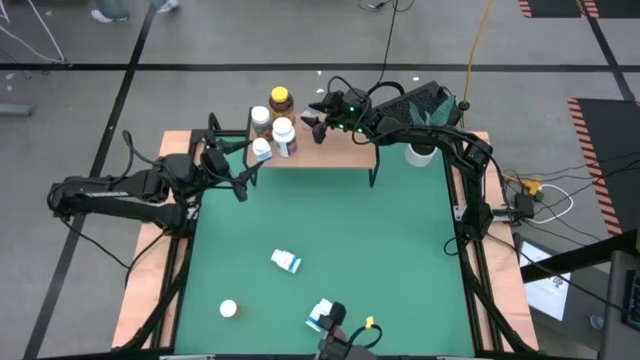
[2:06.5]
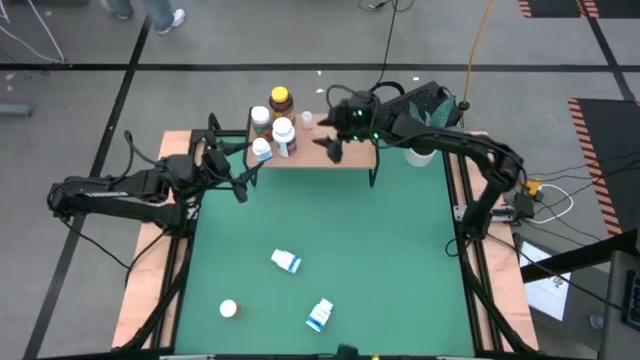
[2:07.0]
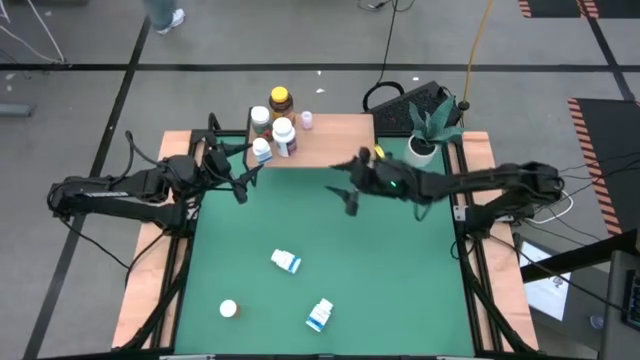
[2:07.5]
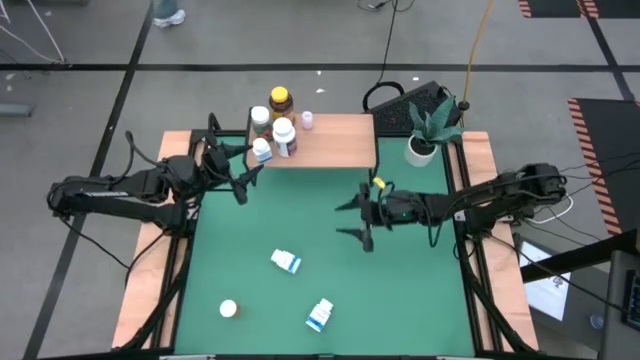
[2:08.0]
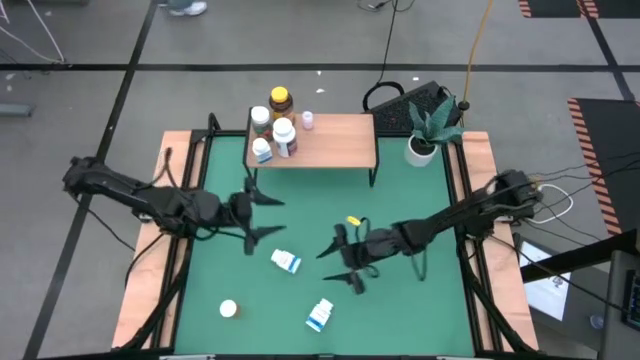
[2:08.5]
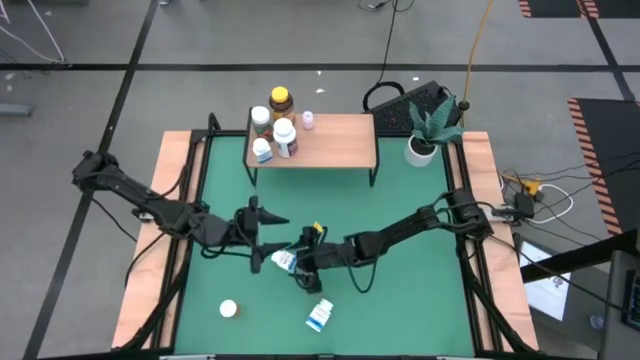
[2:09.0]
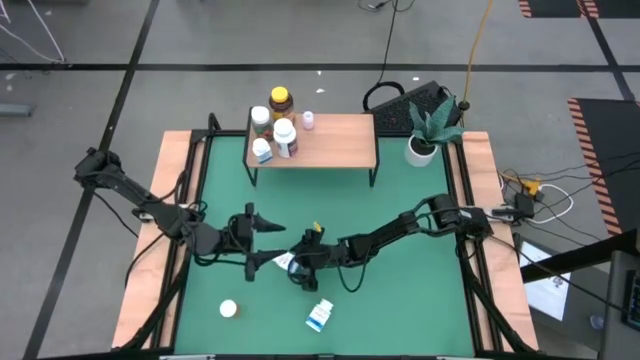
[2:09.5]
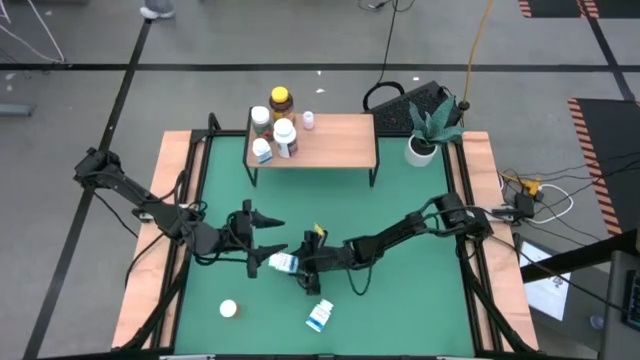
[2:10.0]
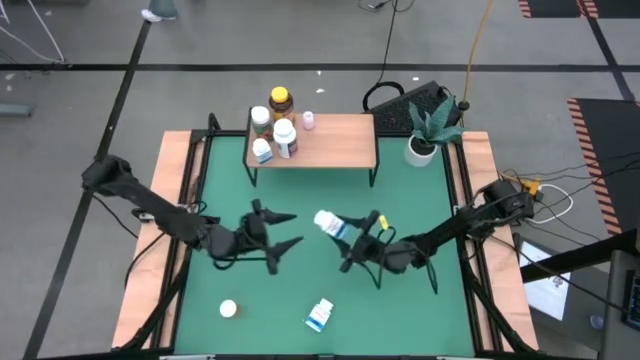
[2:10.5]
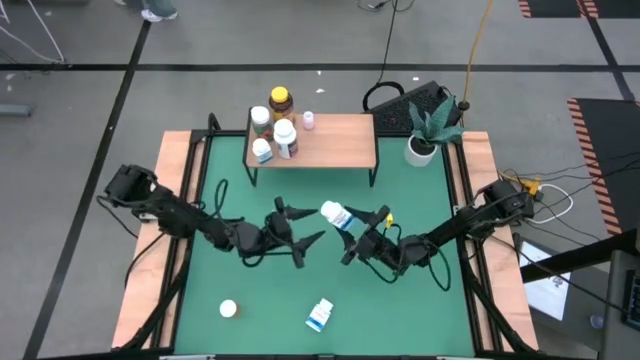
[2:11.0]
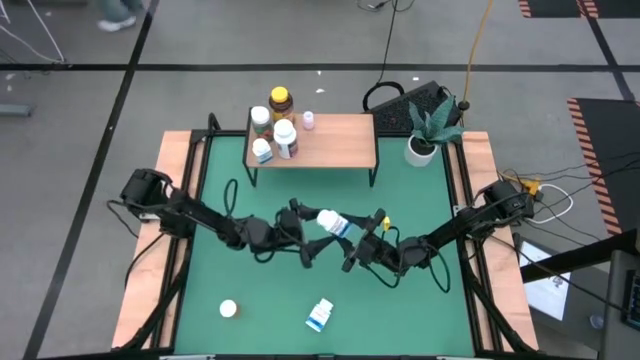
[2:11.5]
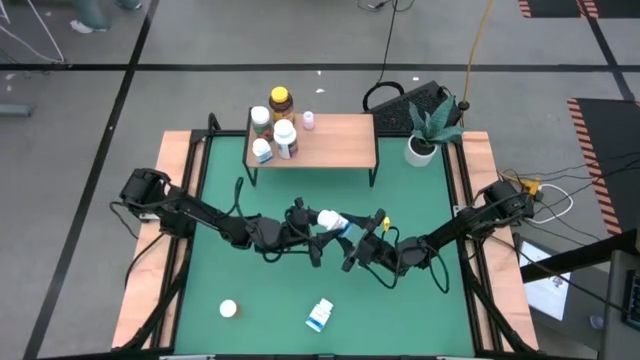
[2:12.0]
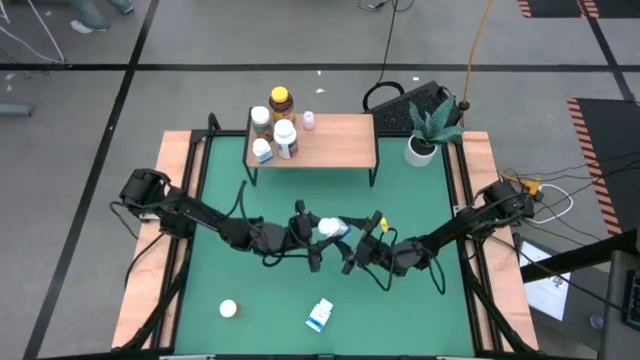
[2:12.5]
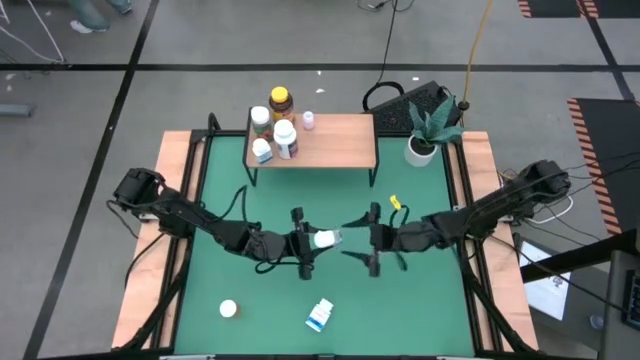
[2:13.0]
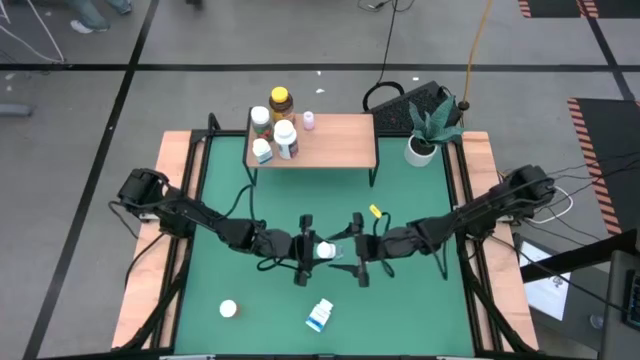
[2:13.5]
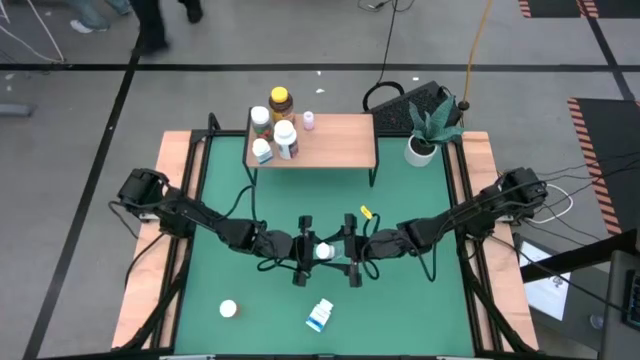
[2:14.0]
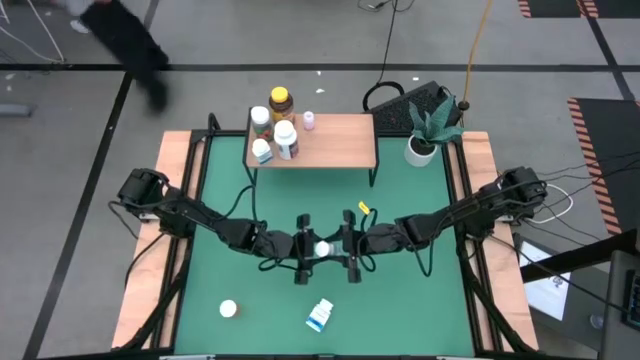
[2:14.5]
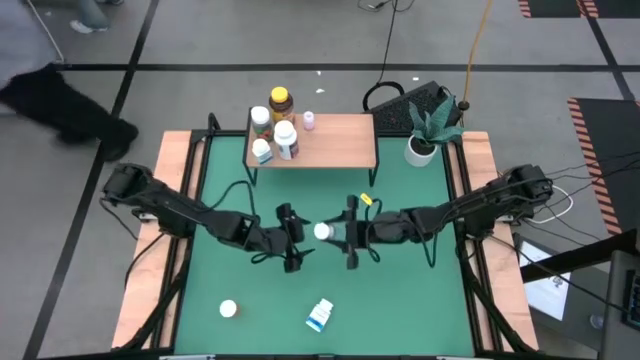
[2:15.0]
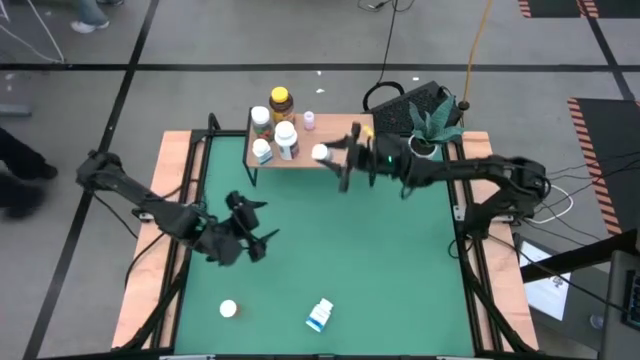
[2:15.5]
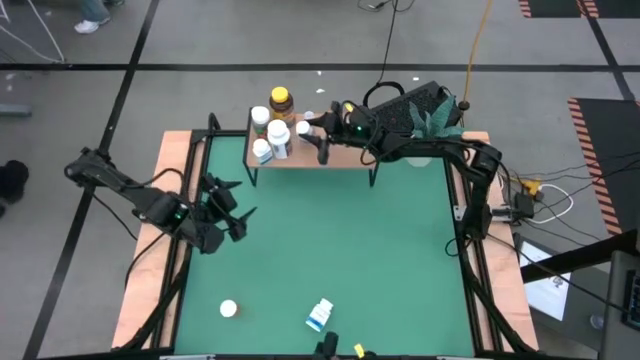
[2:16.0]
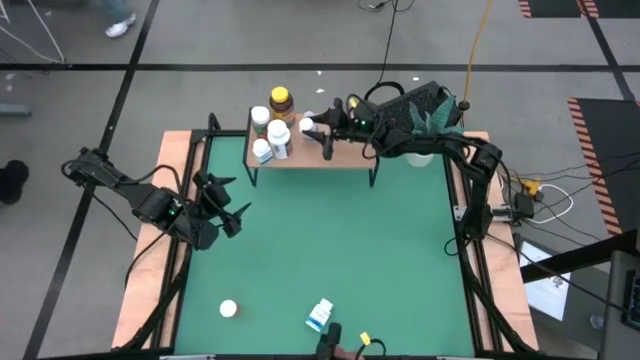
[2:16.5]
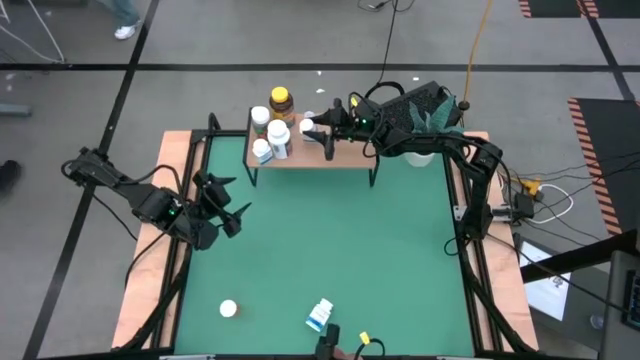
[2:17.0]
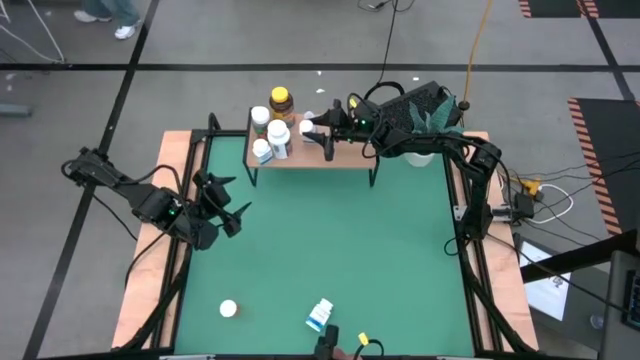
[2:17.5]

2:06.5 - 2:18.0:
Task: Pick and place medicine bottles onto shelf by color
Put the top white blue medicine bottle on the shelf

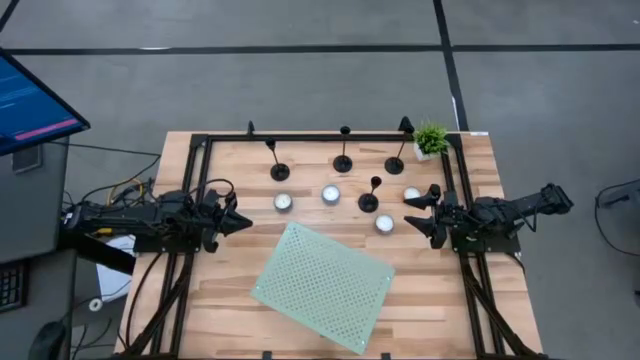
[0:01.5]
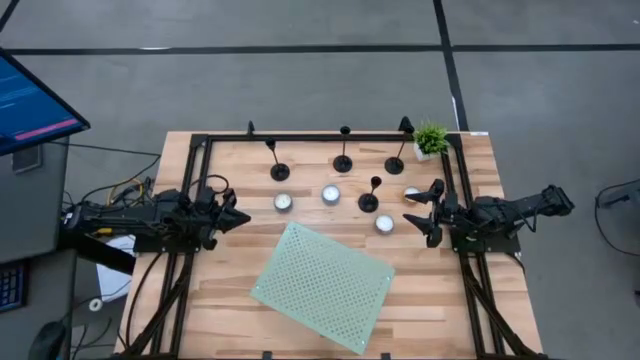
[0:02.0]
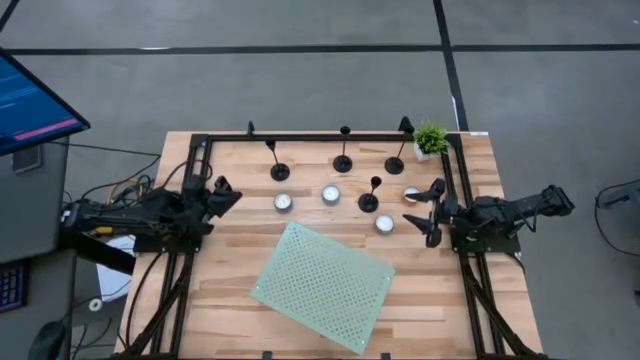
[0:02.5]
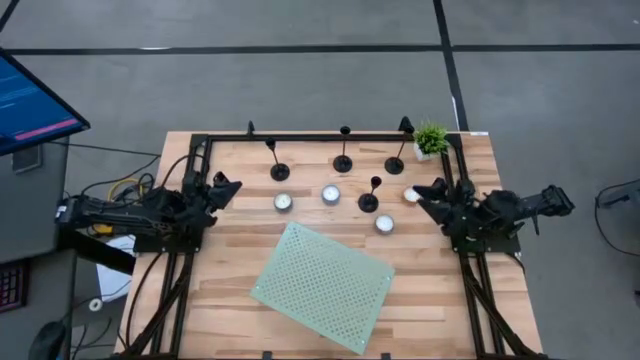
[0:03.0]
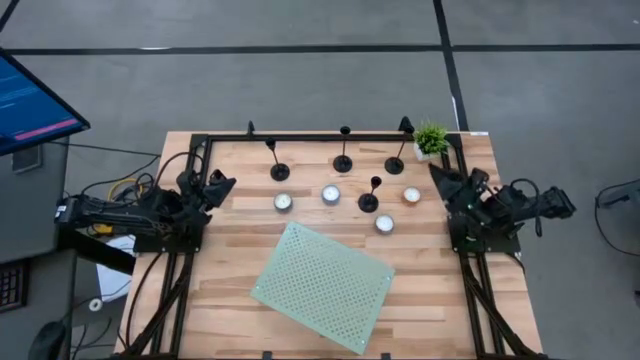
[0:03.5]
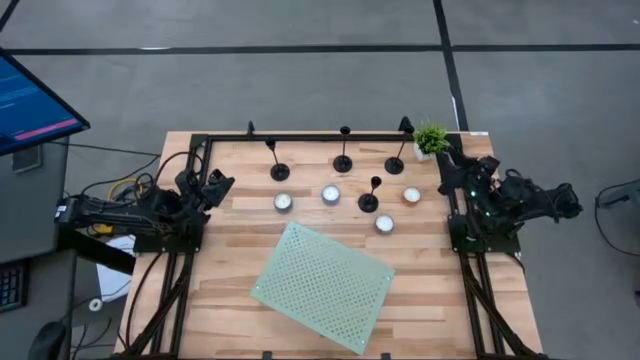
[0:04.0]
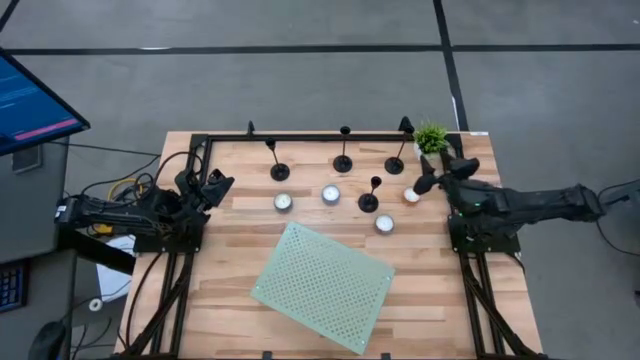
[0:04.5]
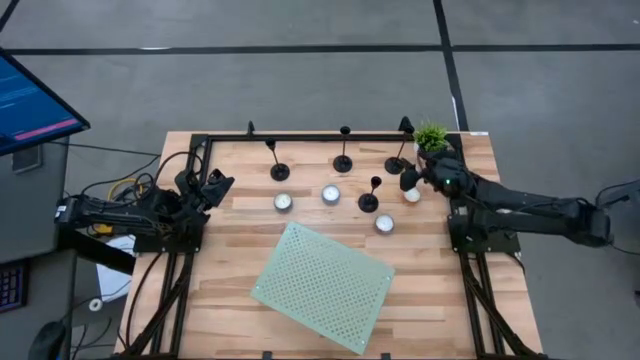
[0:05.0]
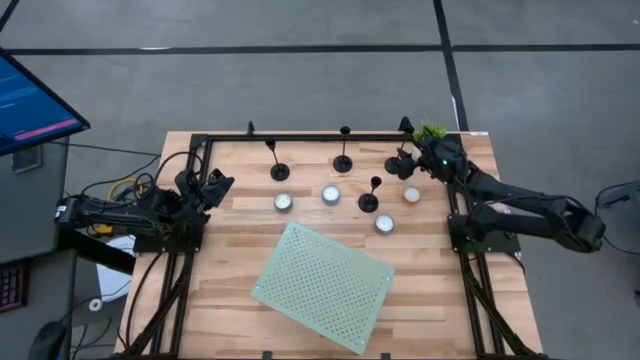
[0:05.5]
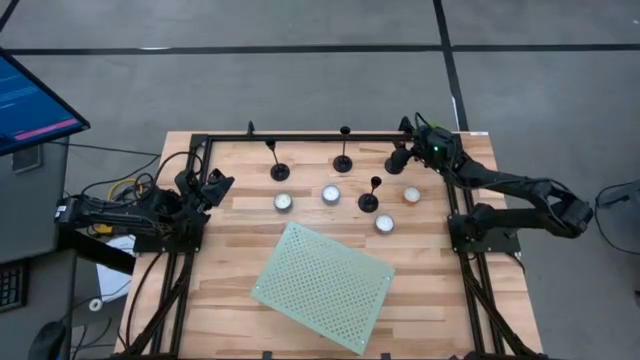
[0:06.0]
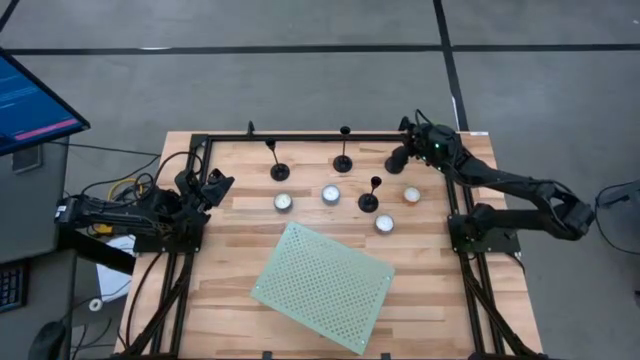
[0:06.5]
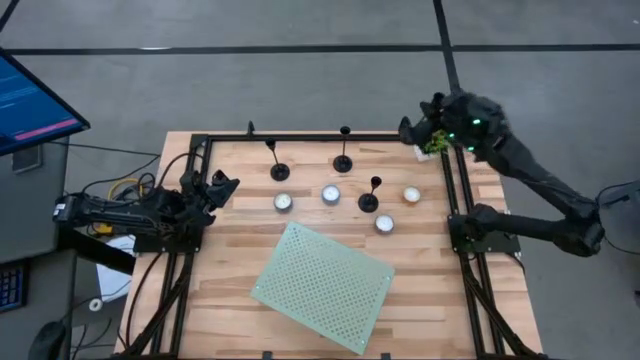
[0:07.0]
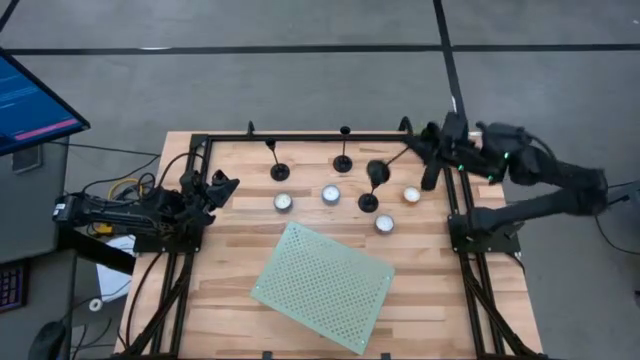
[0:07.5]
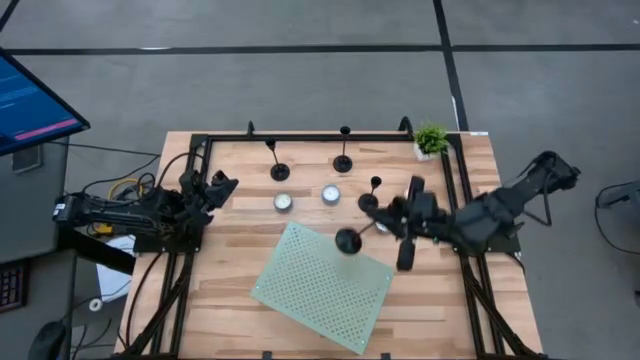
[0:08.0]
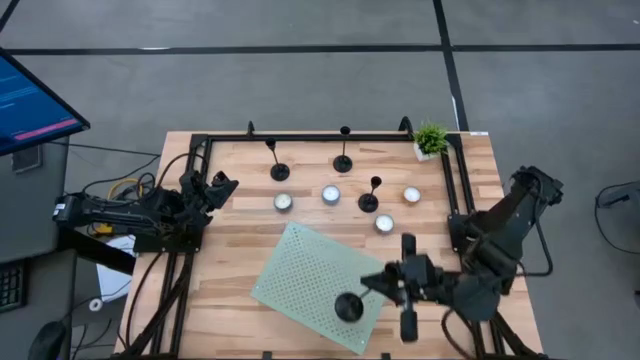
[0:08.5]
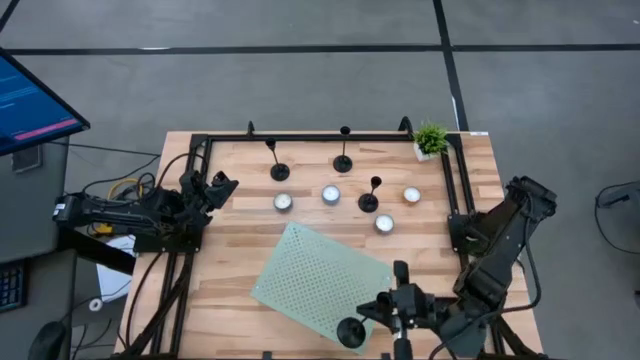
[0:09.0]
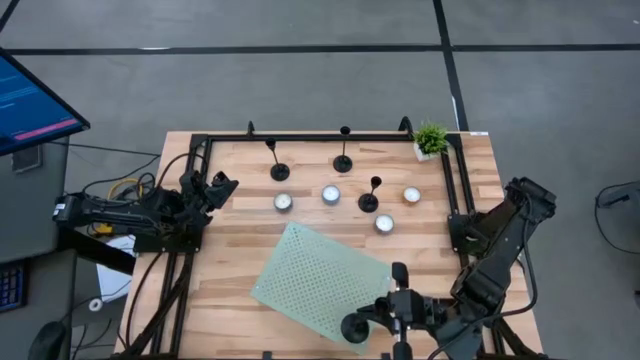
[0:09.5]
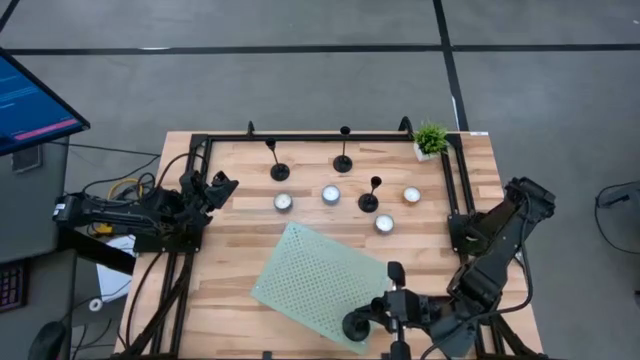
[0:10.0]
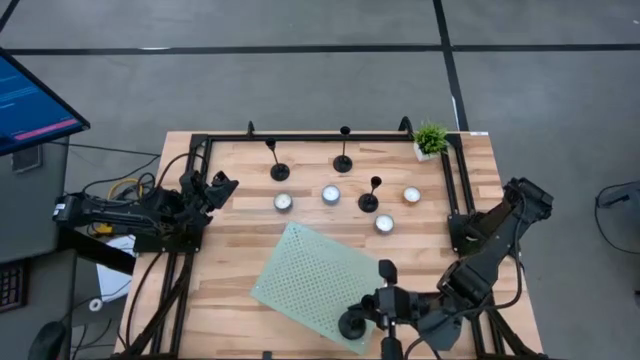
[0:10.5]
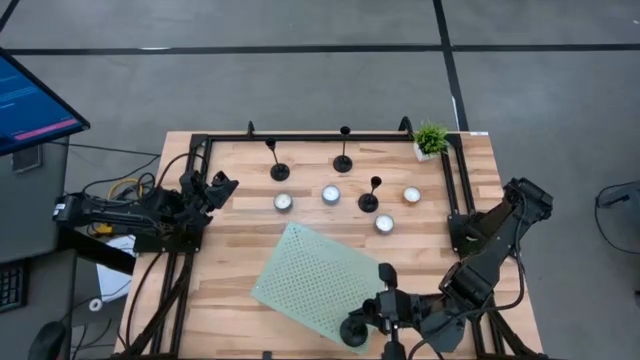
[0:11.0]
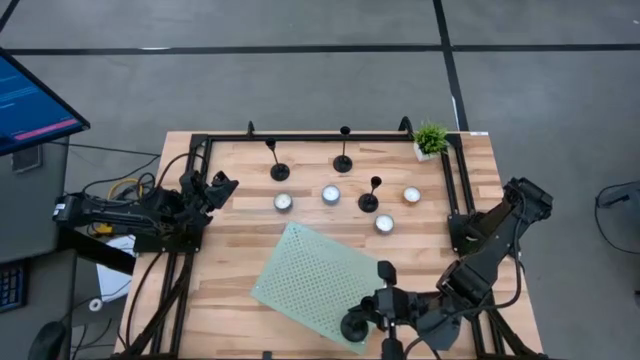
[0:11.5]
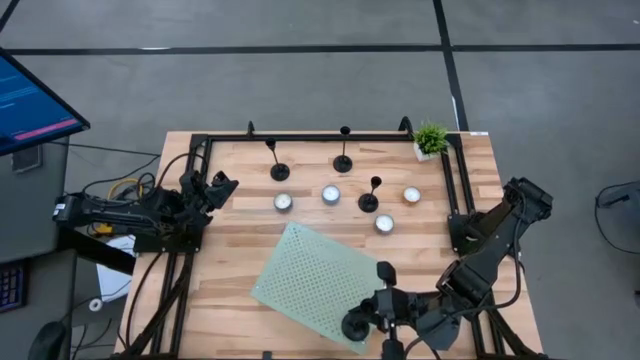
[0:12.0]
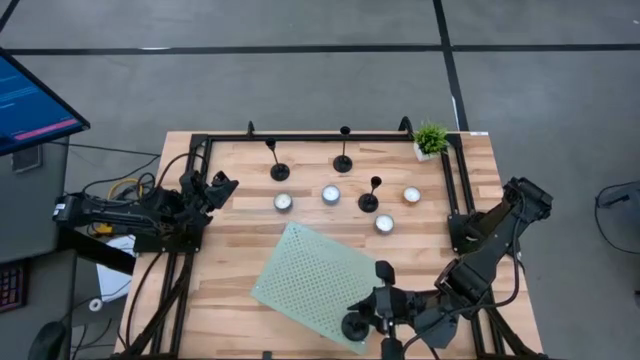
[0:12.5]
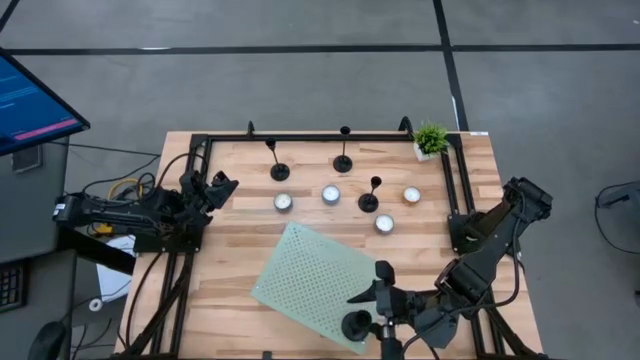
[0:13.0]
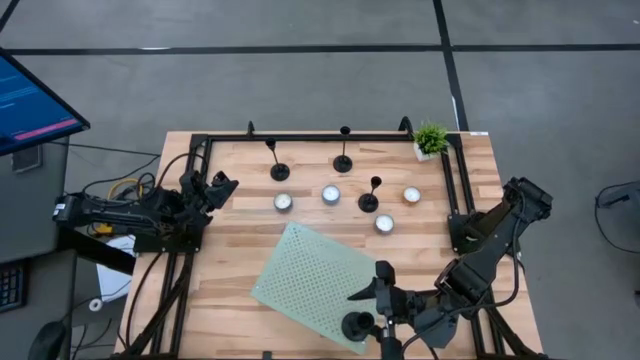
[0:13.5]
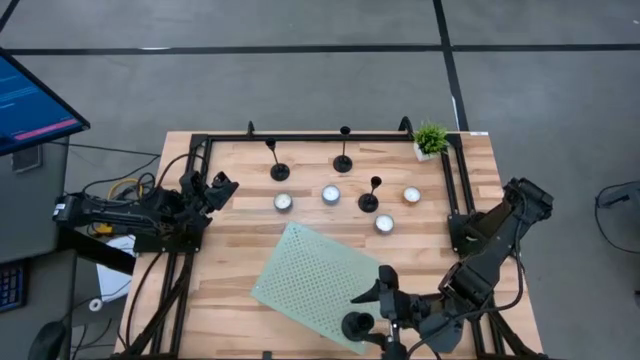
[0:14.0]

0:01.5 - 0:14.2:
Task: Pick & Place candle stick holders
Put the candle holder on the shelf
